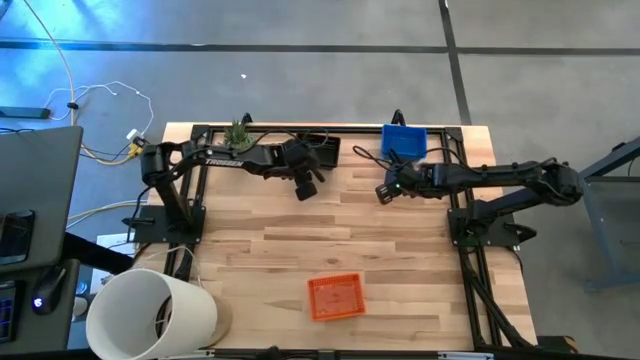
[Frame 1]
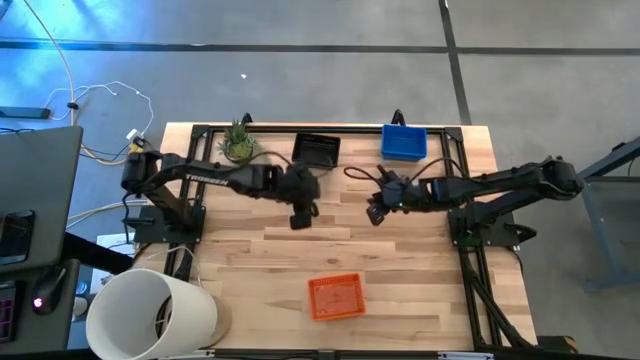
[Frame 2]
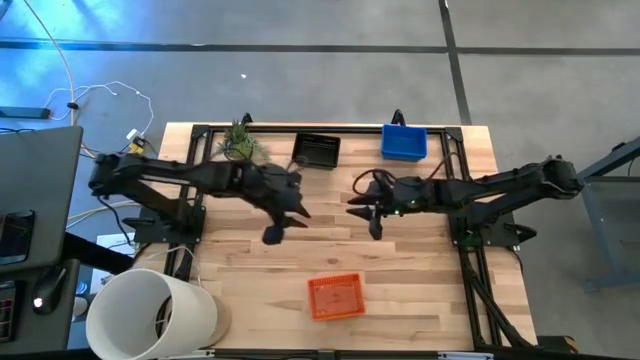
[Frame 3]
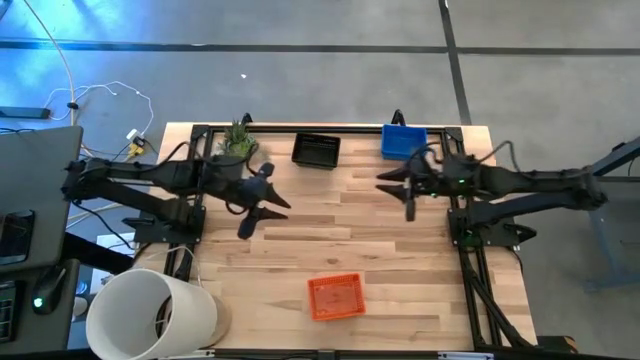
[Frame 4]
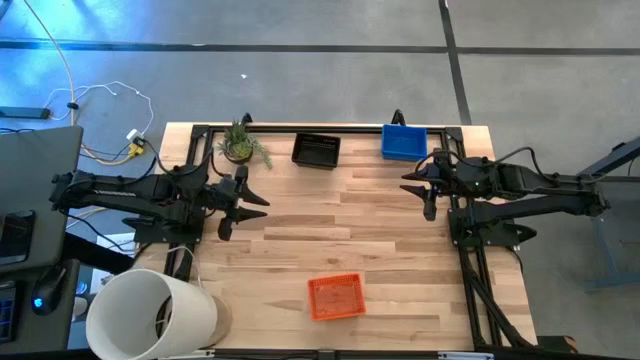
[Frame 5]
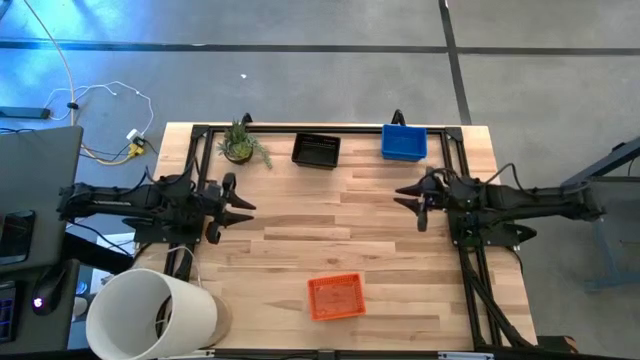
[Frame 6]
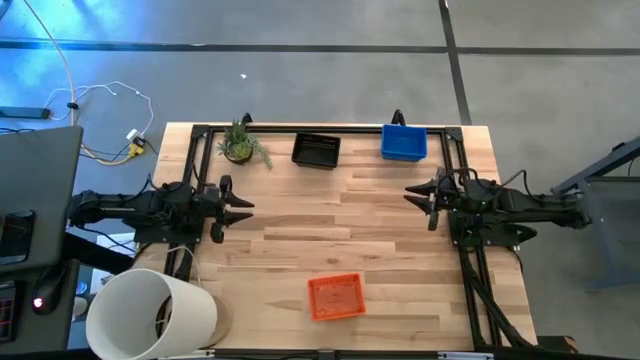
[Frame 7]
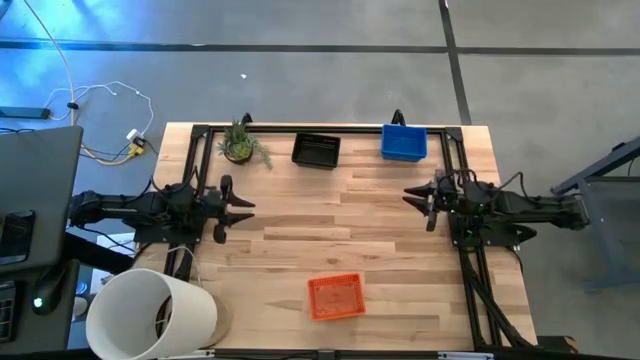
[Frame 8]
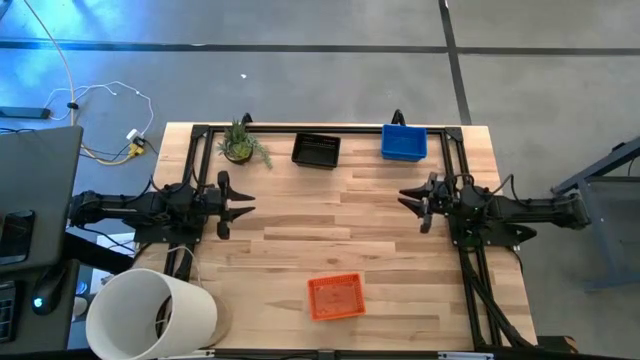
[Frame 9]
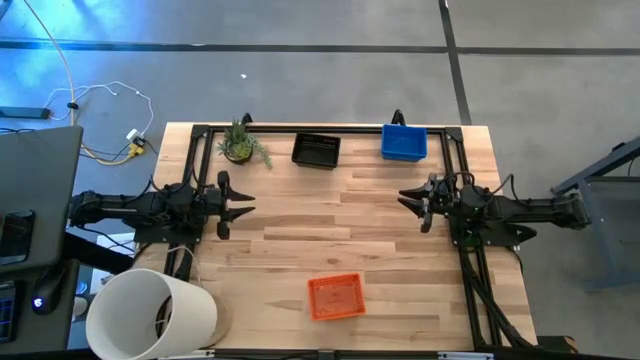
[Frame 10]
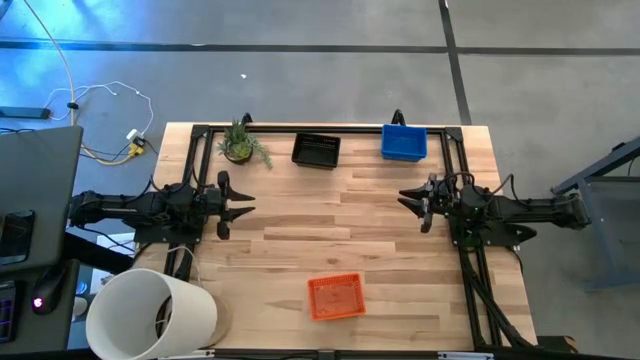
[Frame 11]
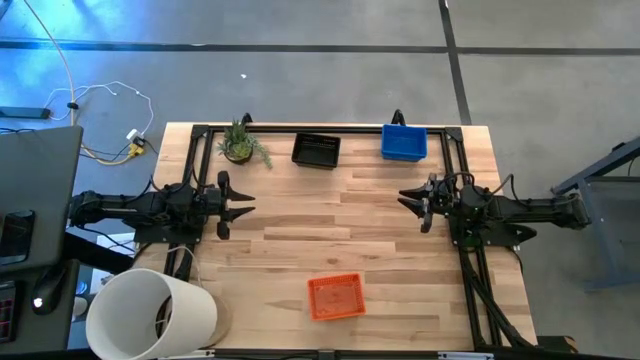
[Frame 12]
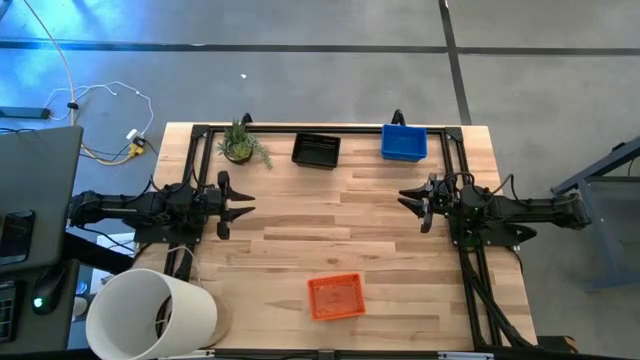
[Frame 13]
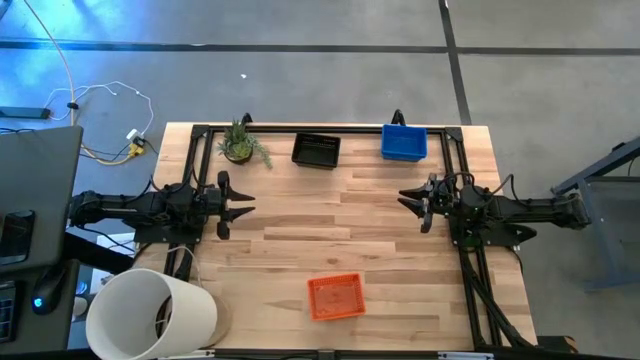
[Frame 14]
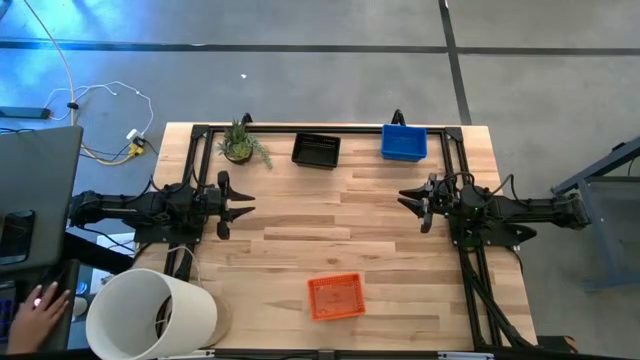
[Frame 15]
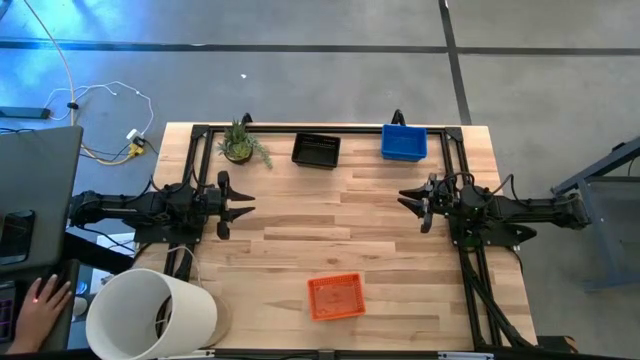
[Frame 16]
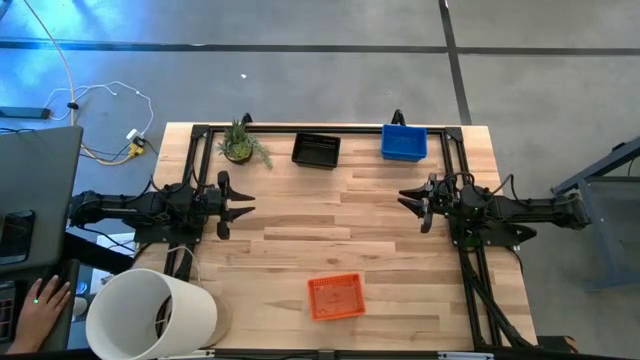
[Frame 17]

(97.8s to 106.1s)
Return to Home Position
